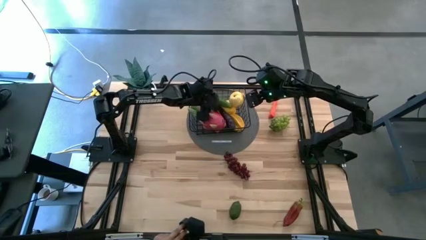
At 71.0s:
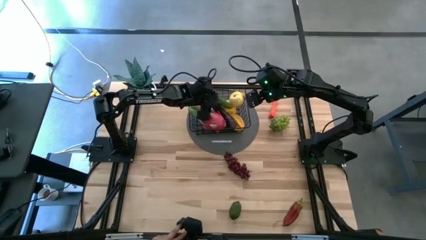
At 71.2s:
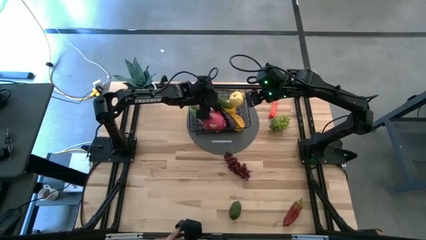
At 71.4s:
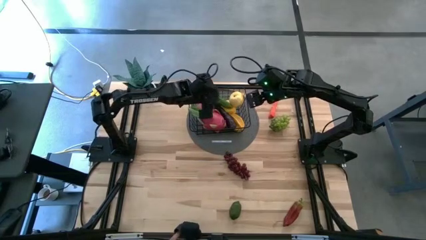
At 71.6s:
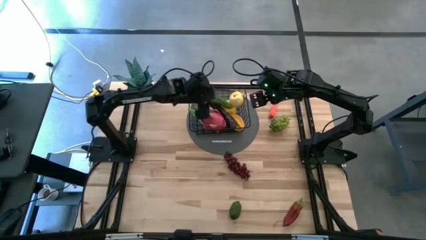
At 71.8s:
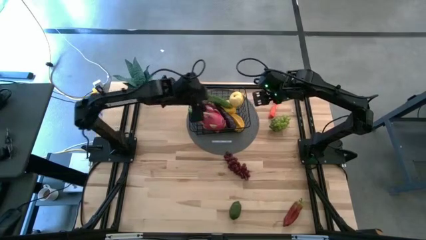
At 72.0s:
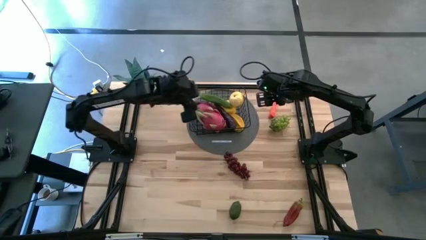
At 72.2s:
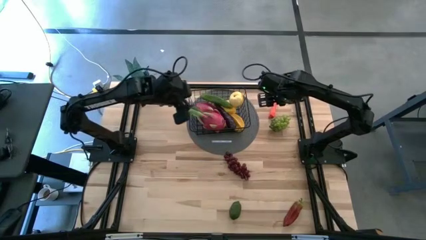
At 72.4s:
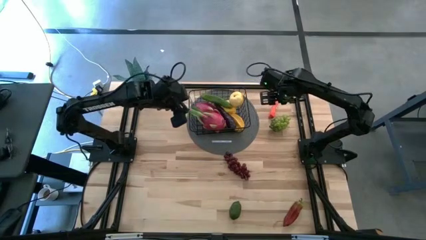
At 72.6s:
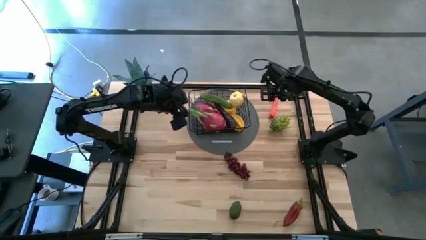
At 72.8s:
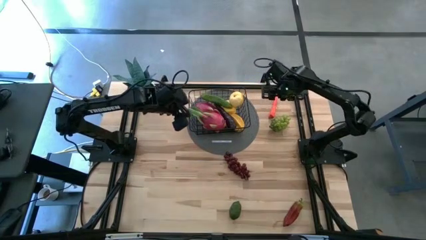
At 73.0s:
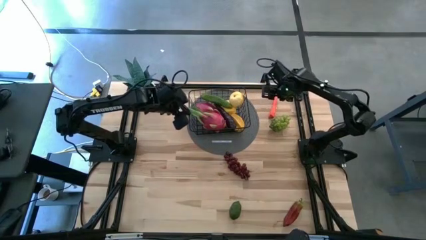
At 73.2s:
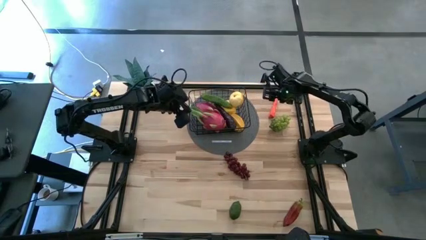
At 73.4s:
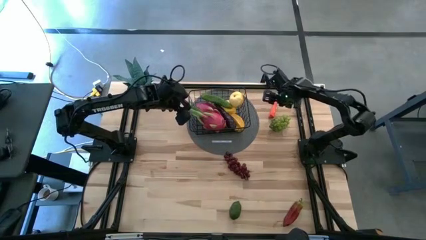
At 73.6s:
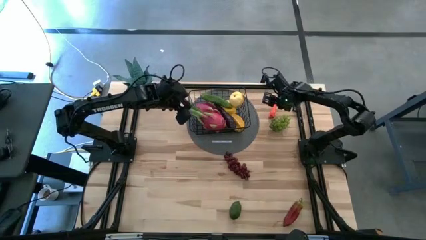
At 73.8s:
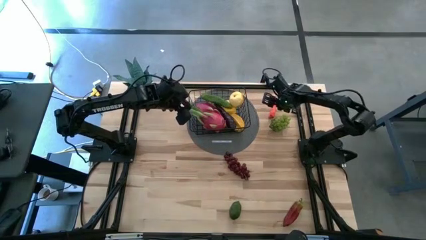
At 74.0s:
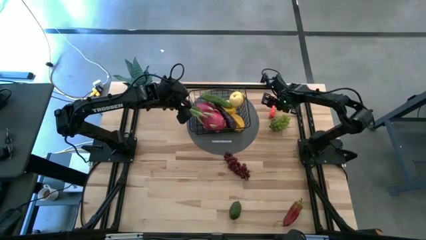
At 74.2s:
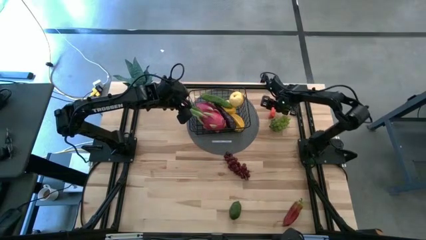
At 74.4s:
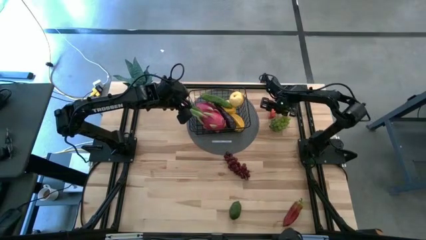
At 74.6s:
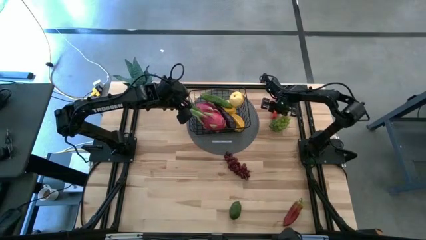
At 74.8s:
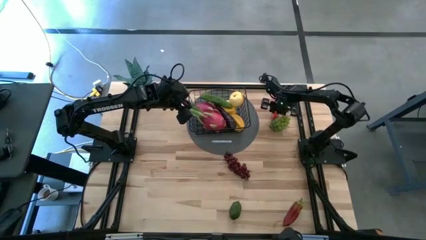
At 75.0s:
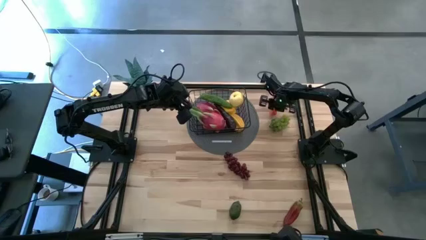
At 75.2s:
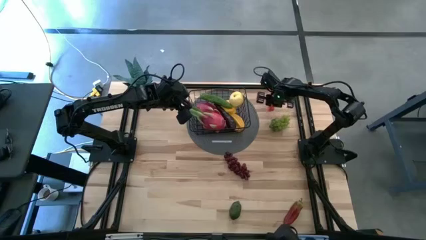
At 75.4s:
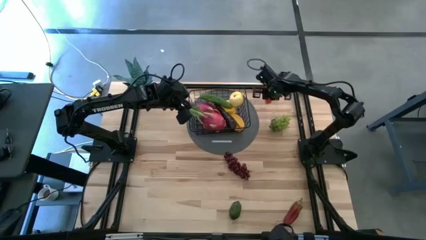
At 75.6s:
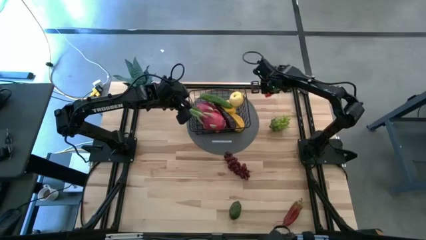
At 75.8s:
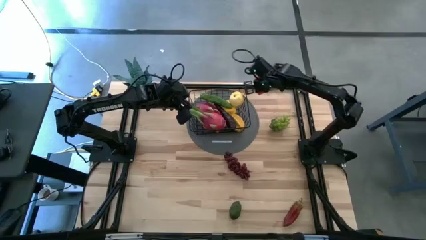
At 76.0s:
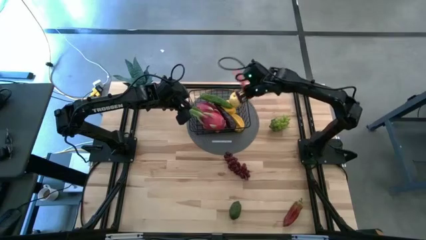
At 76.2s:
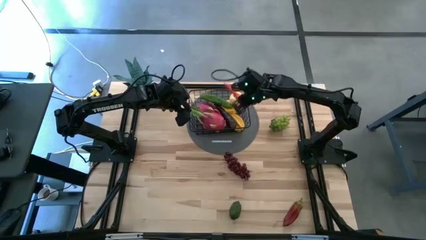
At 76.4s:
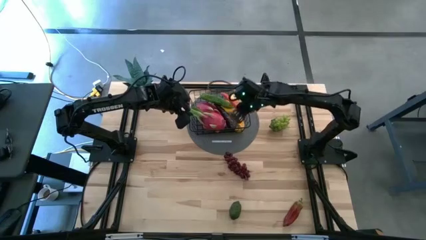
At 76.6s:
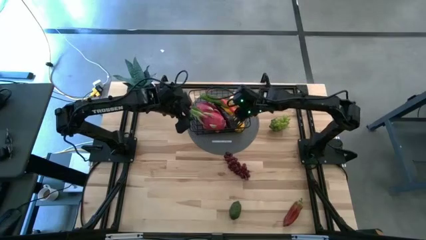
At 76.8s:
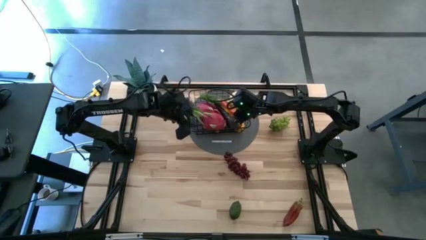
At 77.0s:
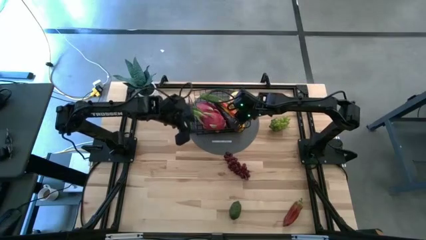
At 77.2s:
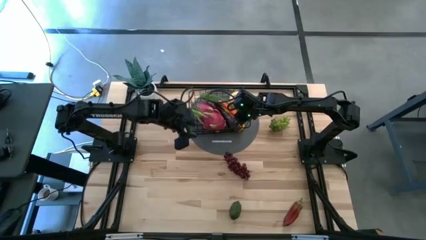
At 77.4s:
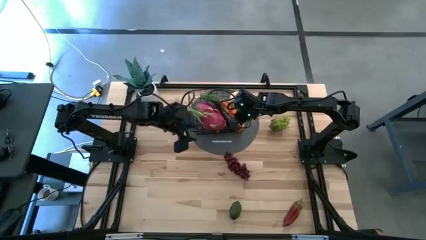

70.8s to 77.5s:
Task: Build produce basket
Put the chili pepper into the wire basket

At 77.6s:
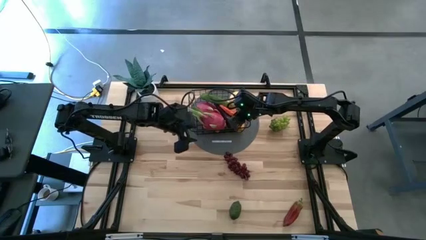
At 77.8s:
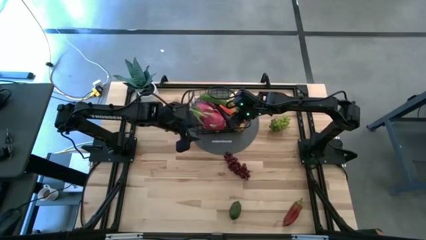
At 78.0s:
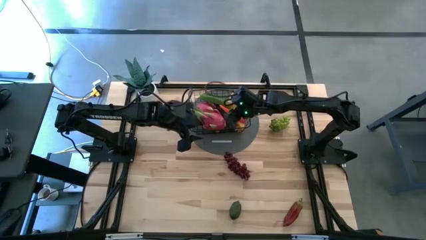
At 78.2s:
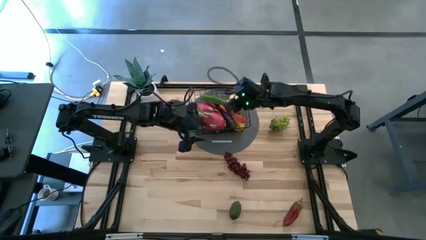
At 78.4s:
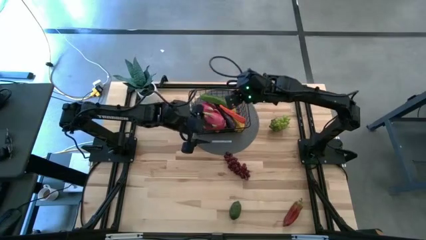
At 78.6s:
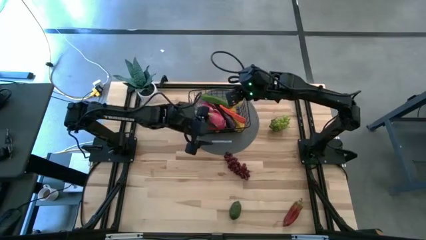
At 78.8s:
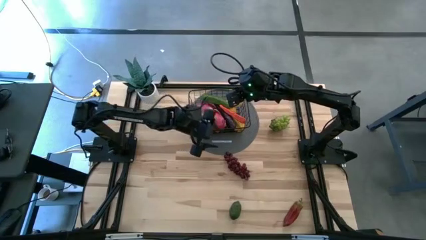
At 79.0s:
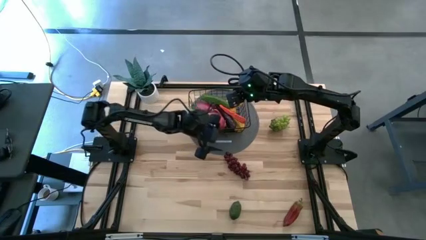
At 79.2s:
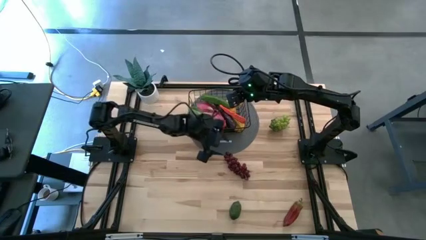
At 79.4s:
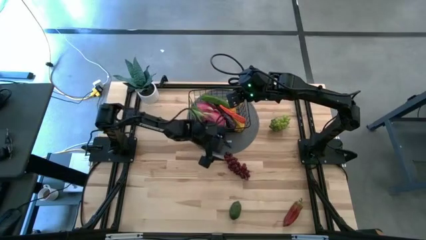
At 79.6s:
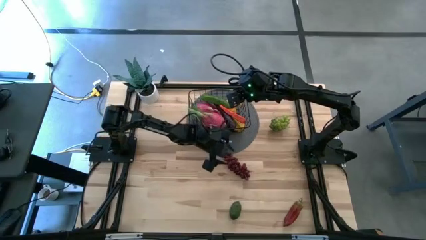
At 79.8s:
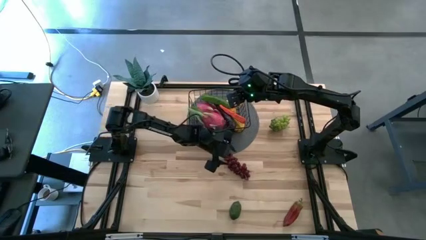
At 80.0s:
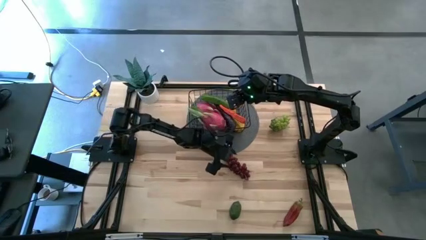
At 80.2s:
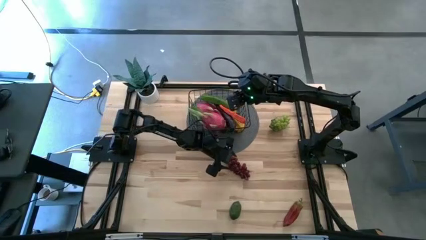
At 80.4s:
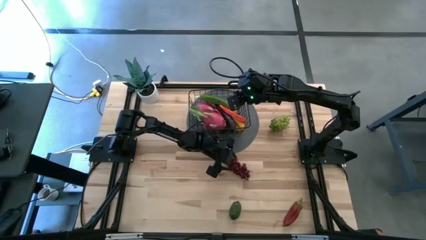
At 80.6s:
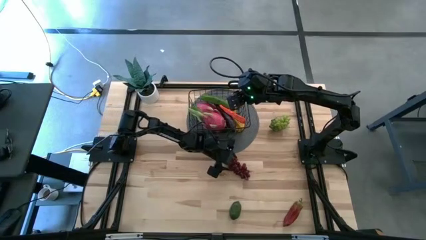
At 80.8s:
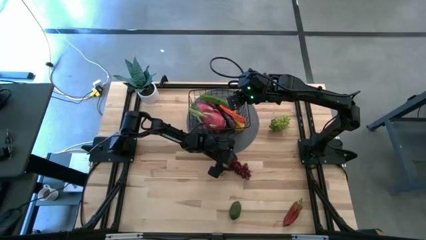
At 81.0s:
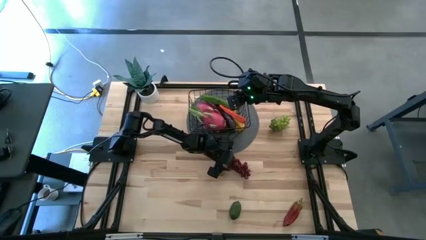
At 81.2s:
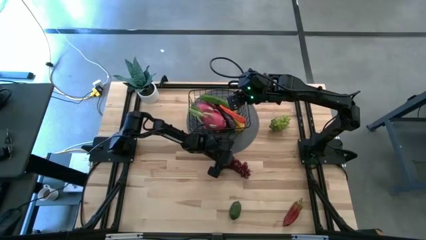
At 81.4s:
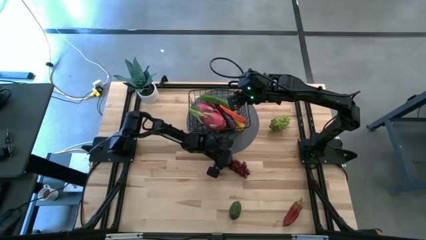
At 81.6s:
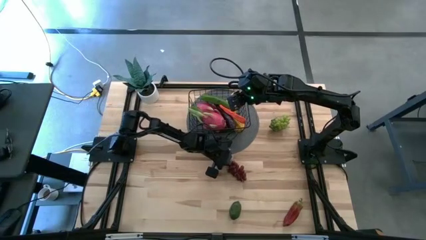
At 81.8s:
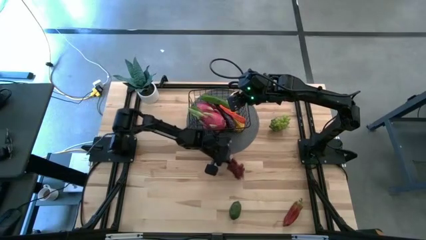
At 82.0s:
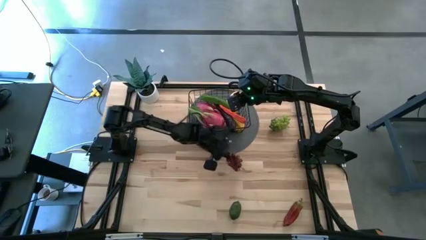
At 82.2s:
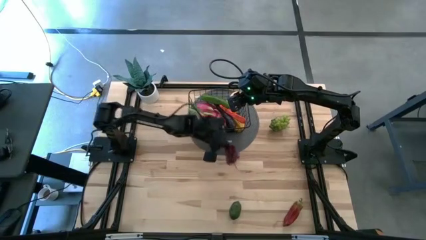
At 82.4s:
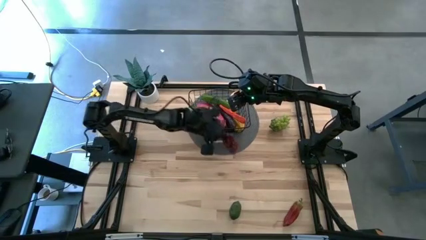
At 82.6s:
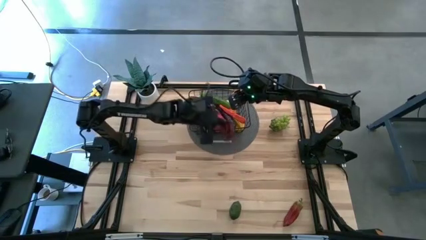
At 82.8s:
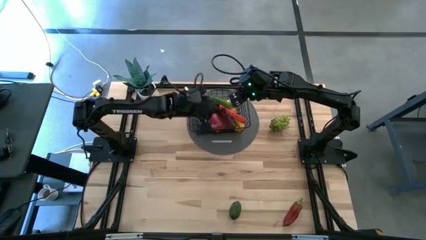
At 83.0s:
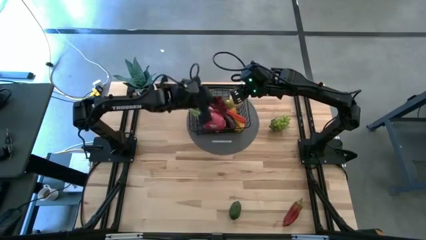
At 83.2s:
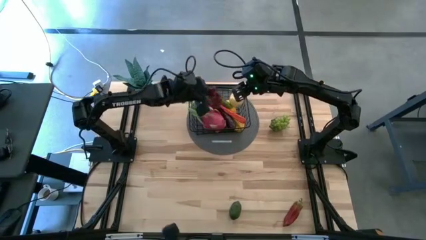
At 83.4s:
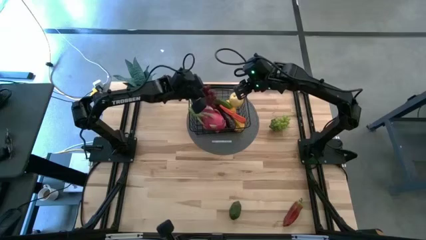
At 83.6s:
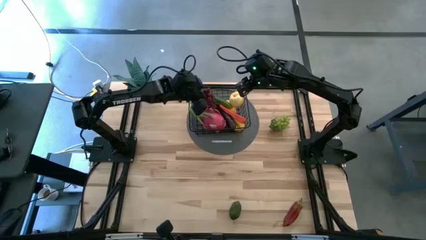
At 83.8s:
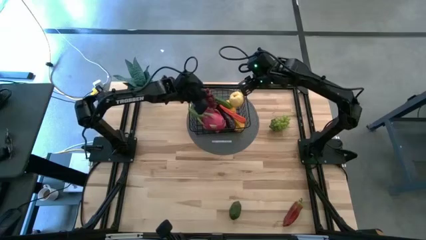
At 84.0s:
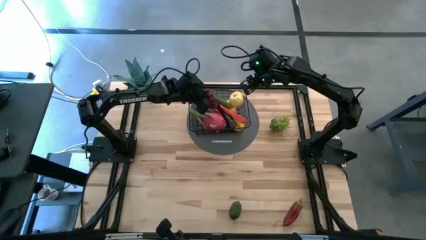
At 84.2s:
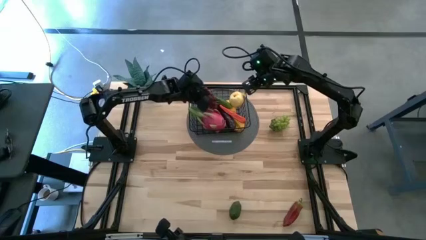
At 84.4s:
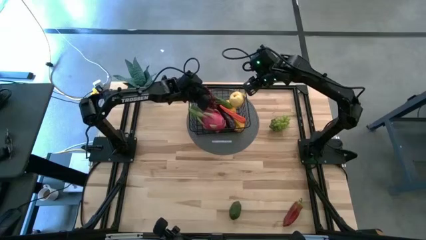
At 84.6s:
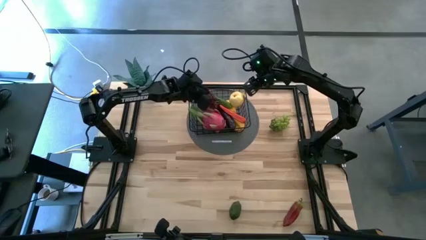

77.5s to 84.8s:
Put the purple grapes into the wire basket
